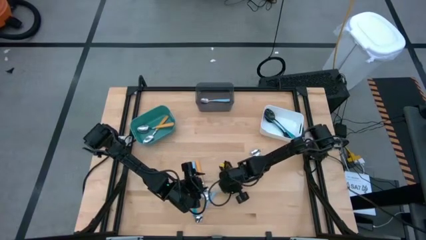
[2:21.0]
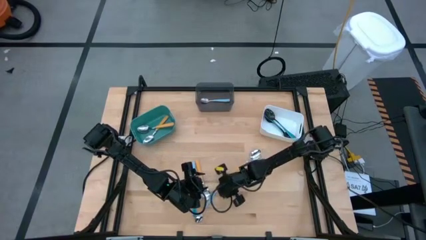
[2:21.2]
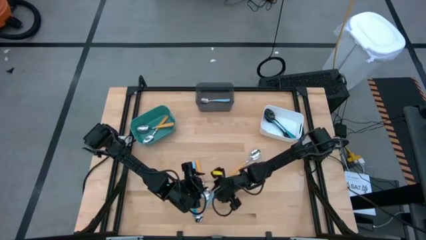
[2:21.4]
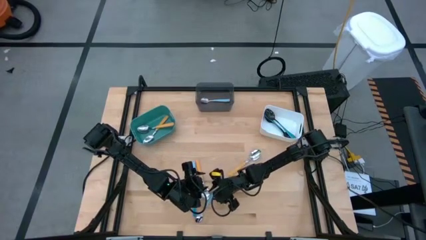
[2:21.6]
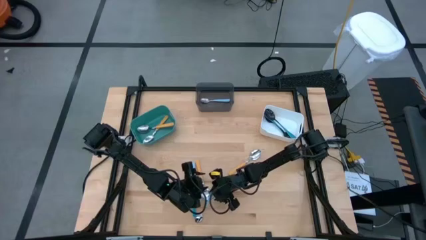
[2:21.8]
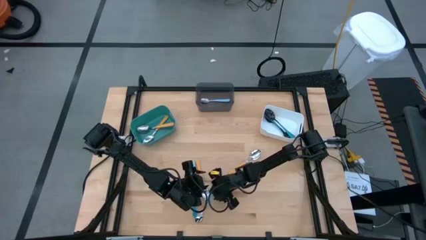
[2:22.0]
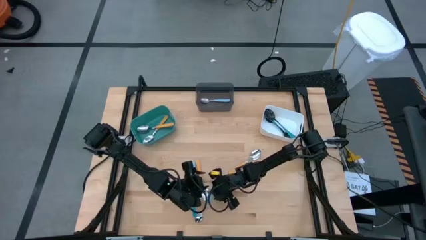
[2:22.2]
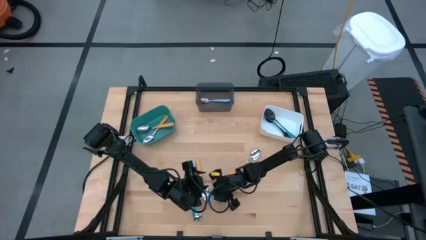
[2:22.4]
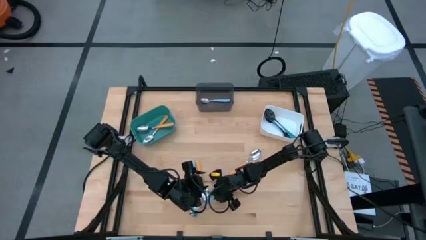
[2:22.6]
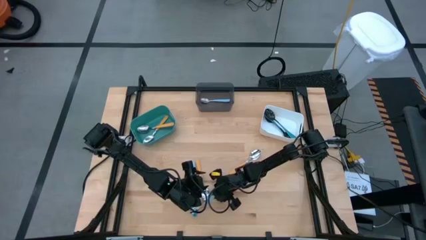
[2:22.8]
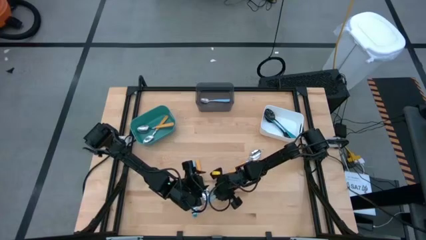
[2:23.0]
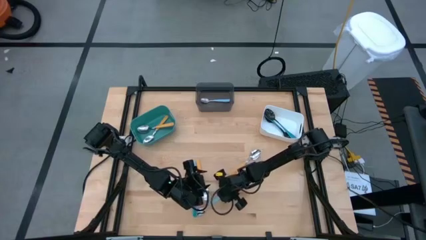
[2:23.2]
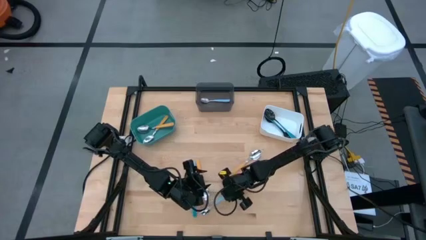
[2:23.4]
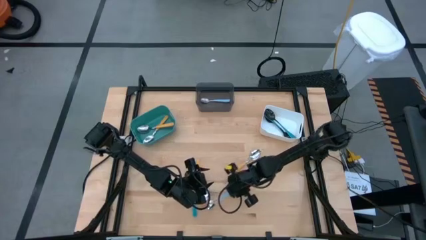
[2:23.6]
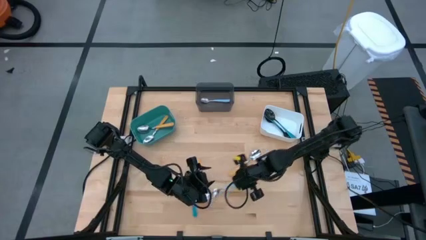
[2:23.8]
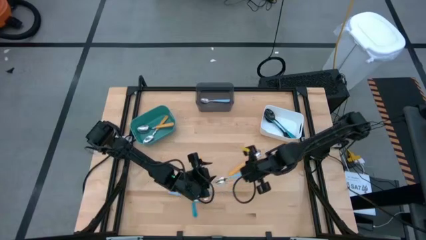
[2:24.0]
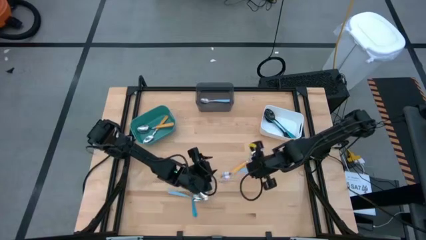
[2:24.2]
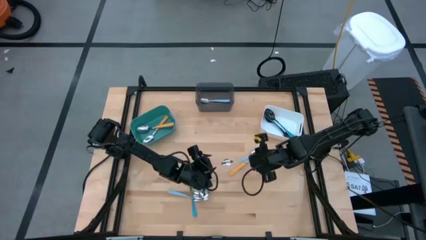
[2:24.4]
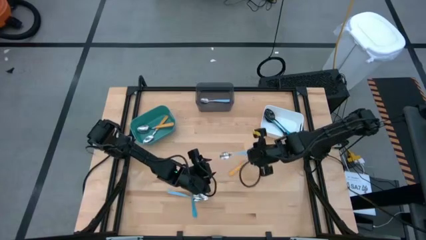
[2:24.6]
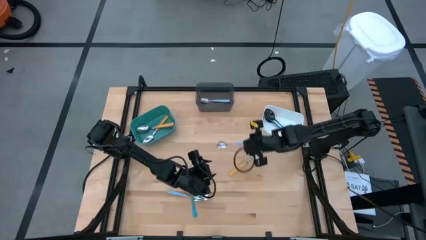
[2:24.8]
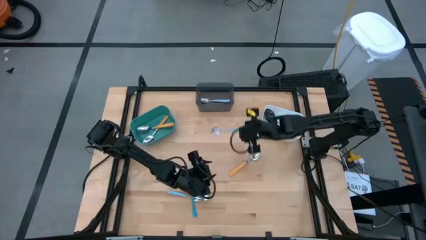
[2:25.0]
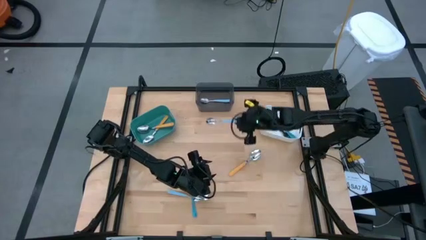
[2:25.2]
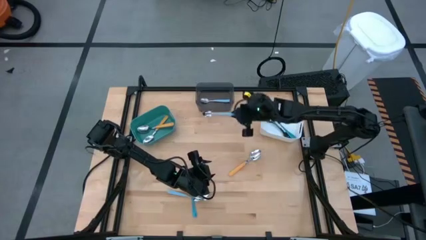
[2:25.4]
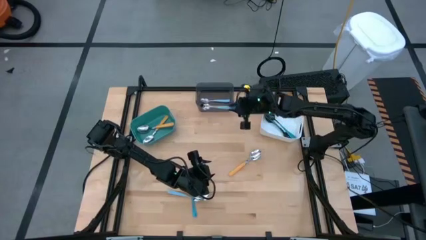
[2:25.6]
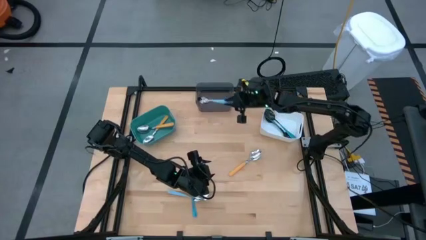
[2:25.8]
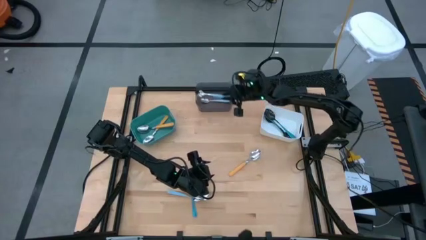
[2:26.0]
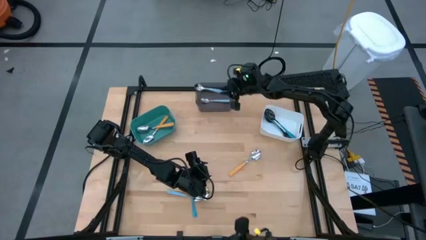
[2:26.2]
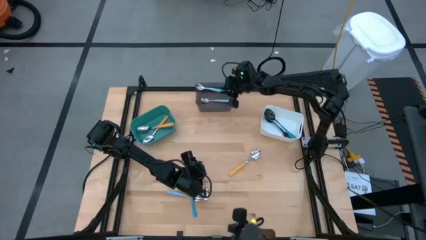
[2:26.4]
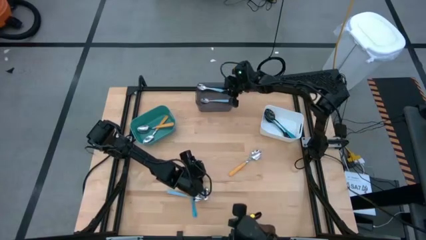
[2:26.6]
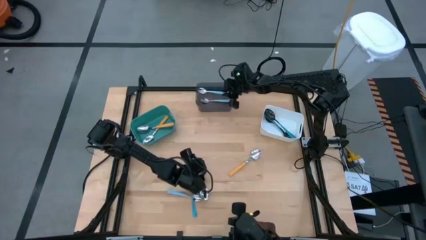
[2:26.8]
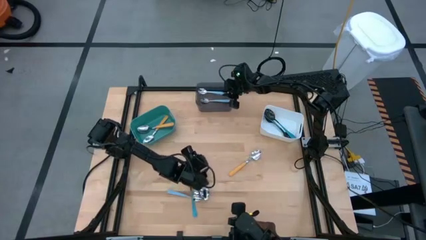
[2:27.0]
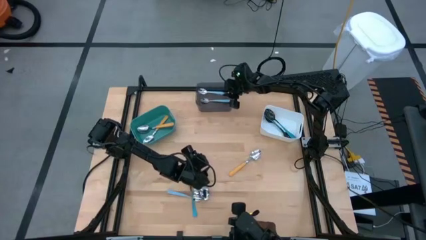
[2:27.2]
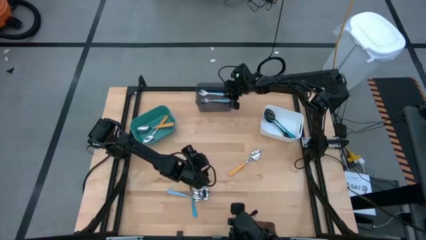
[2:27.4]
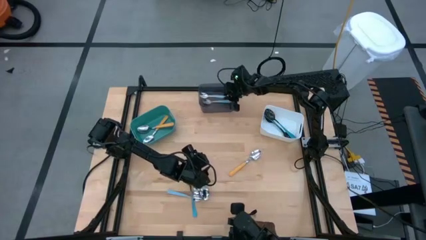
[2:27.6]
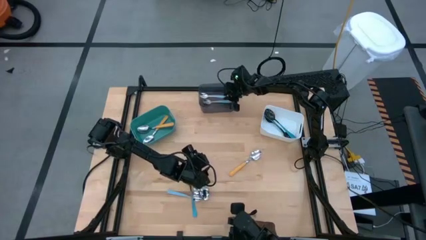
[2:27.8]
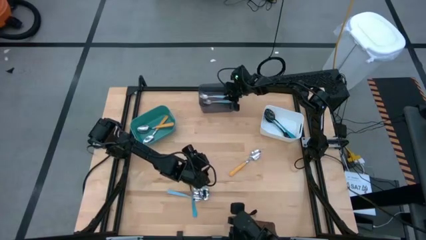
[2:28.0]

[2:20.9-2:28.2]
Task: Sort silverware by color (type)
Put the light blue spoon into the black bin

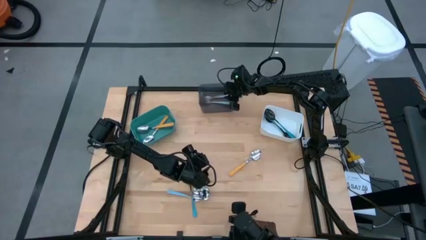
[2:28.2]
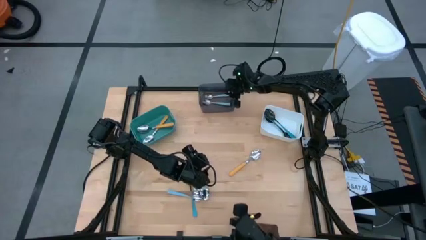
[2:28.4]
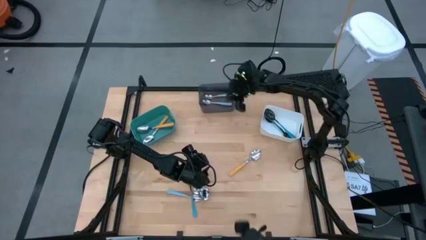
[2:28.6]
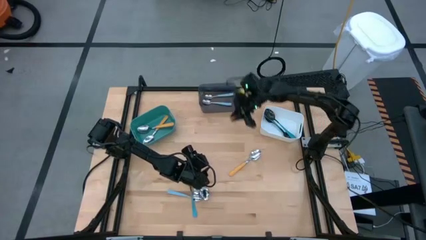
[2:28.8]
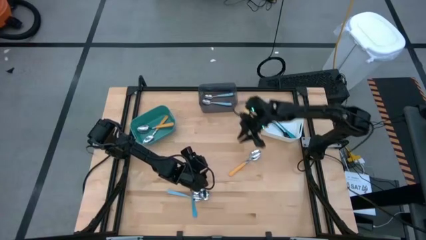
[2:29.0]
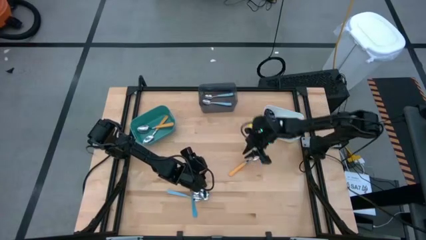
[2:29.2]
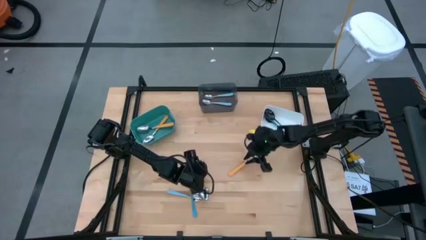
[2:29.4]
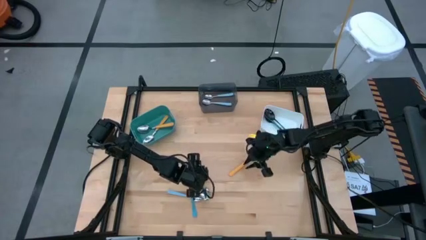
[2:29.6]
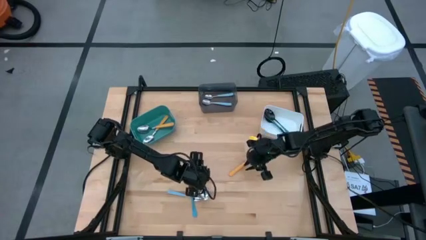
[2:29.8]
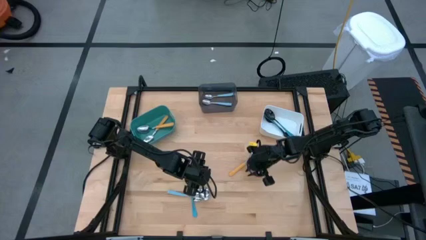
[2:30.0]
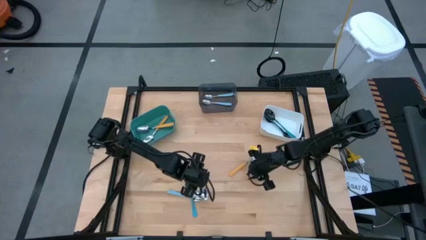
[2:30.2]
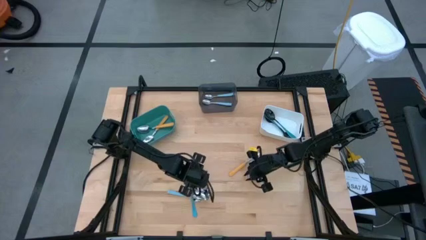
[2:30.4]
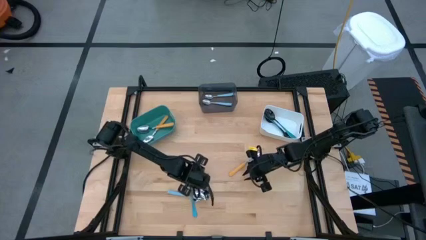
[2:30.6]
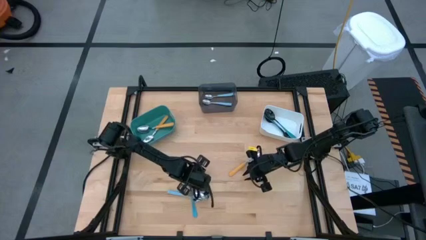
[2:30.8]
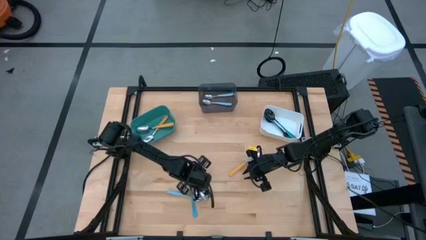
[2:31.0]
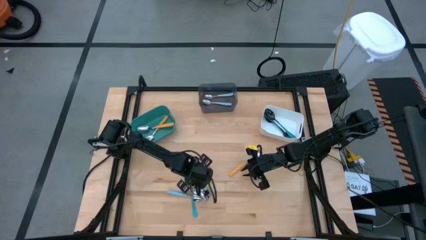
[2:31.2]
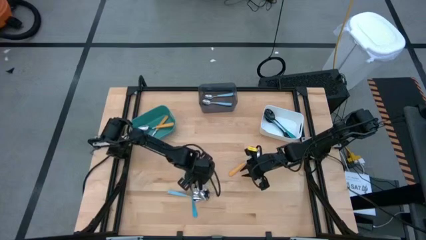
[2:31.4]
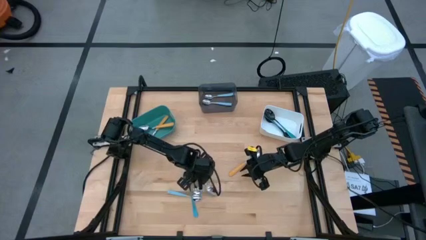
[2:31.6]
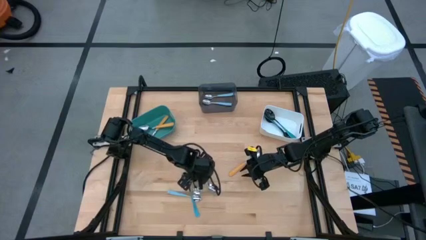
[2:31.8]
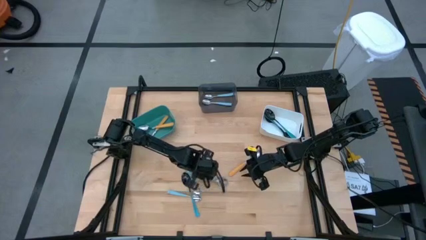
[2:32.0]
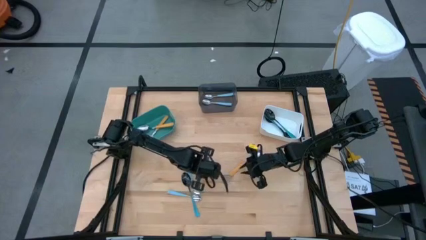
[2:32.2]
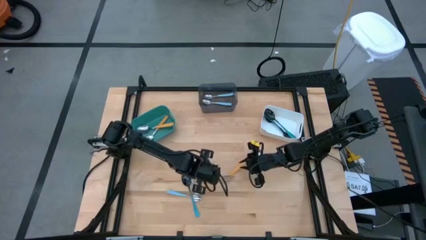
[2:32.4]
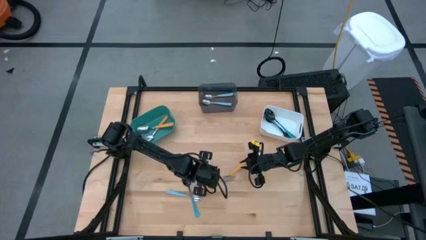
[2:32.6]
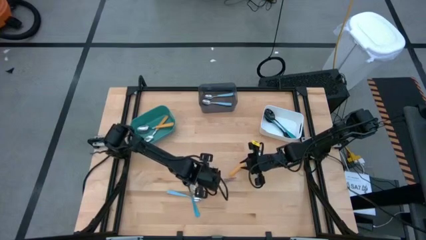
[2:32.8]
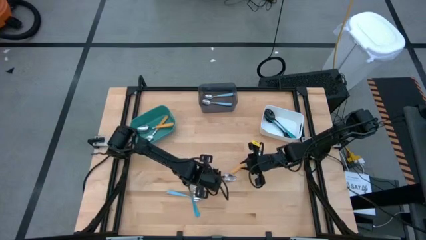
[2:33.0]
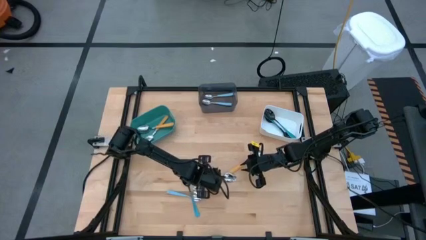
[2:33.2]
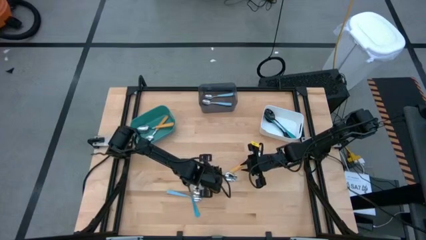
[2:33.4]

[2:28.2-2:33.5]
Put the yellow spoon into the green bin
